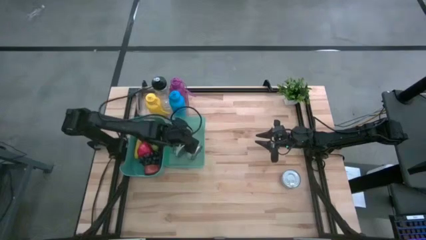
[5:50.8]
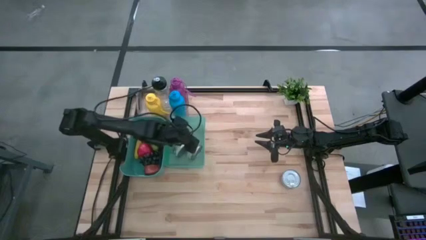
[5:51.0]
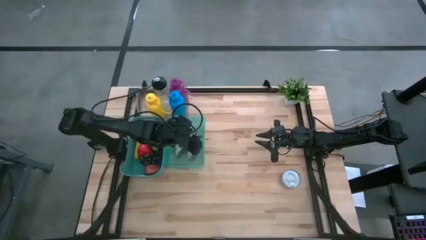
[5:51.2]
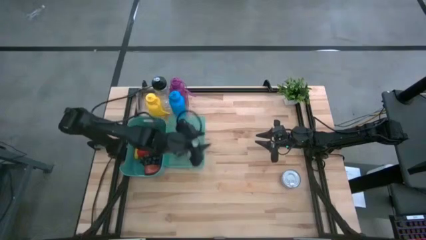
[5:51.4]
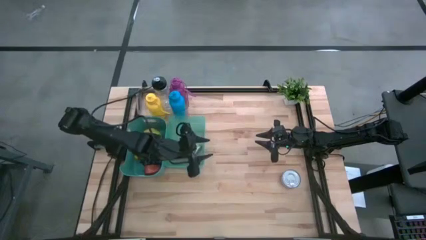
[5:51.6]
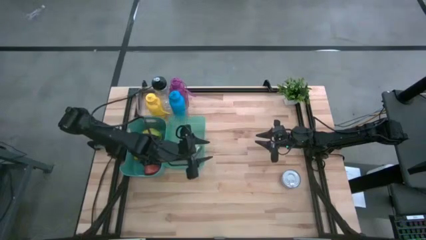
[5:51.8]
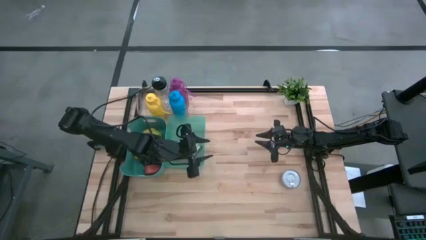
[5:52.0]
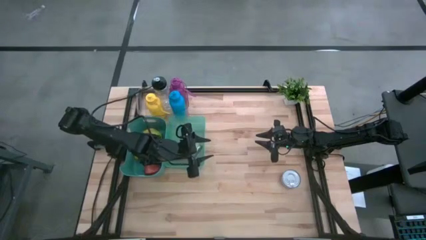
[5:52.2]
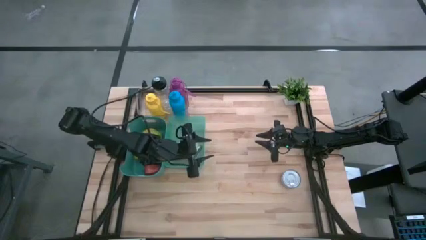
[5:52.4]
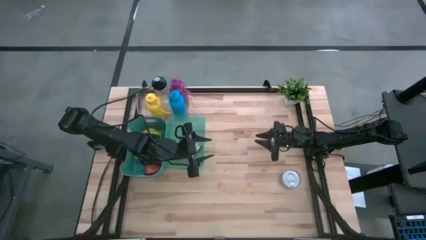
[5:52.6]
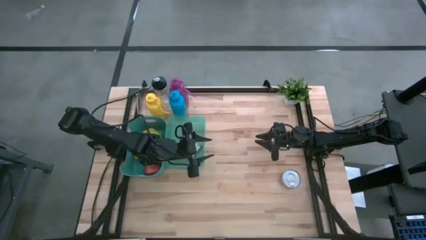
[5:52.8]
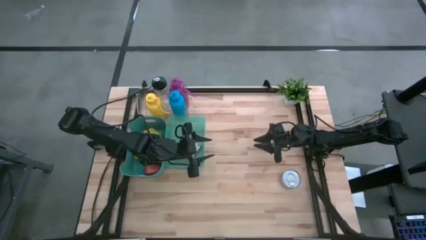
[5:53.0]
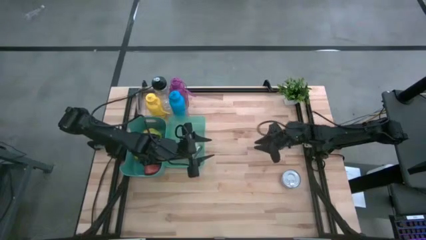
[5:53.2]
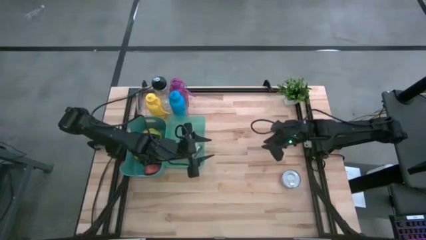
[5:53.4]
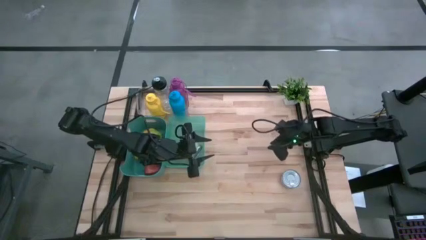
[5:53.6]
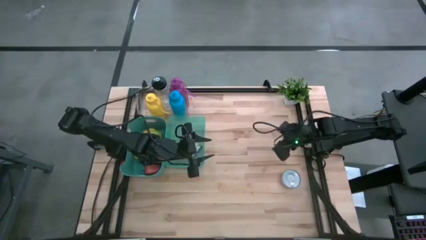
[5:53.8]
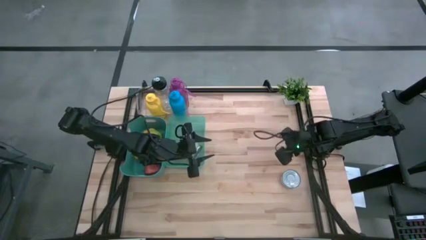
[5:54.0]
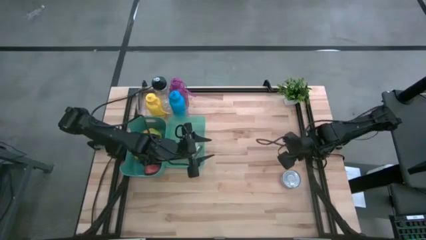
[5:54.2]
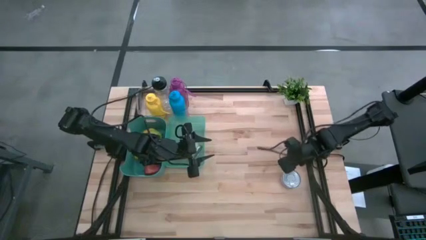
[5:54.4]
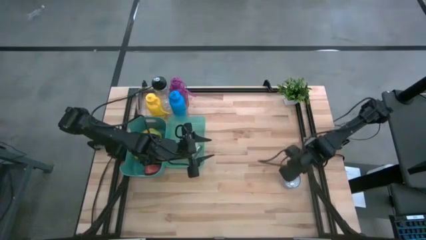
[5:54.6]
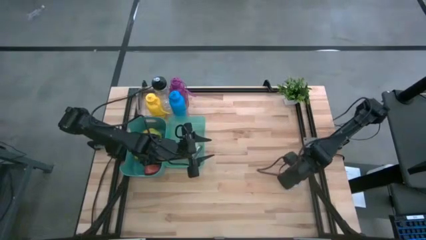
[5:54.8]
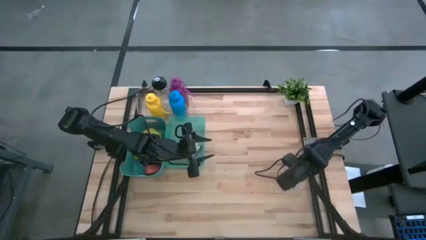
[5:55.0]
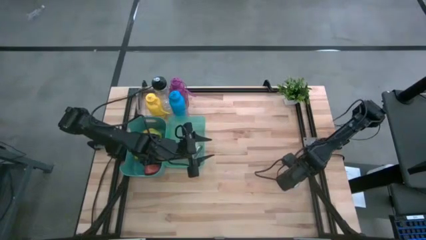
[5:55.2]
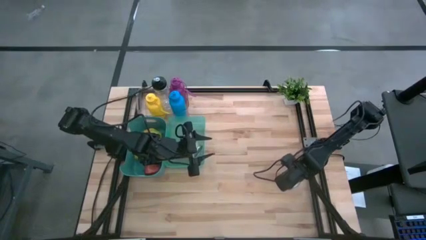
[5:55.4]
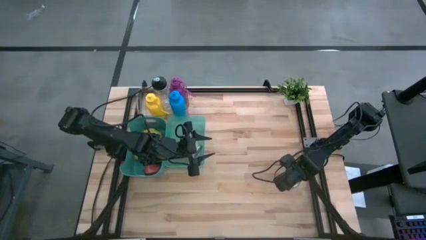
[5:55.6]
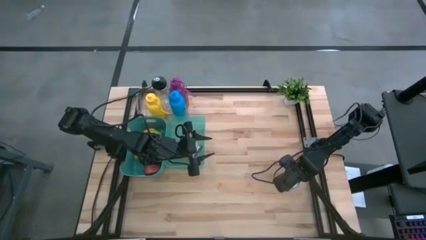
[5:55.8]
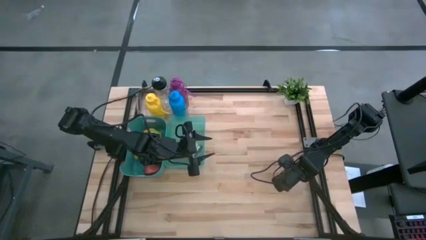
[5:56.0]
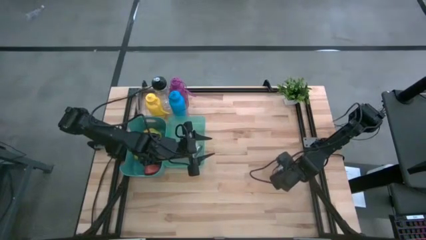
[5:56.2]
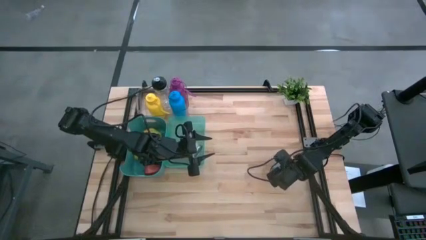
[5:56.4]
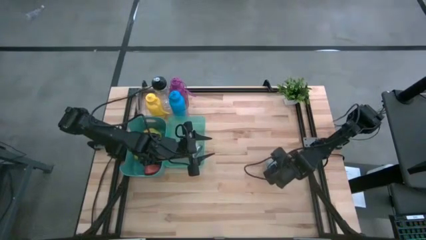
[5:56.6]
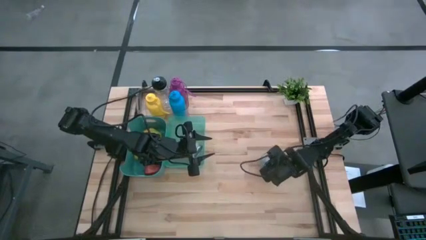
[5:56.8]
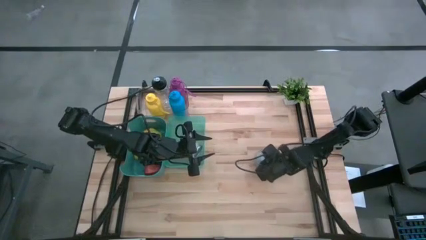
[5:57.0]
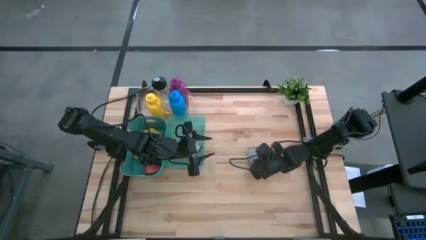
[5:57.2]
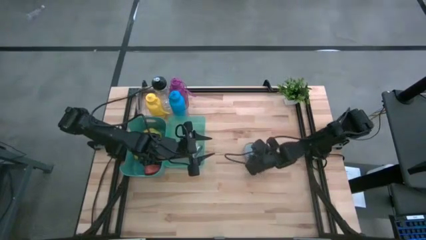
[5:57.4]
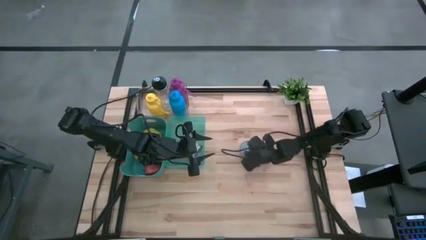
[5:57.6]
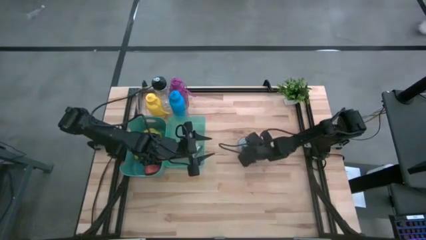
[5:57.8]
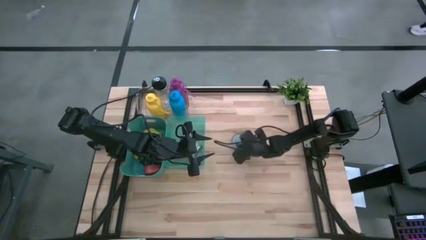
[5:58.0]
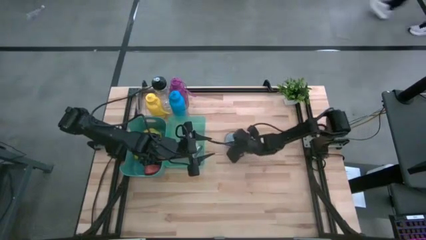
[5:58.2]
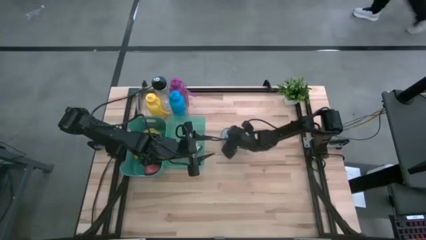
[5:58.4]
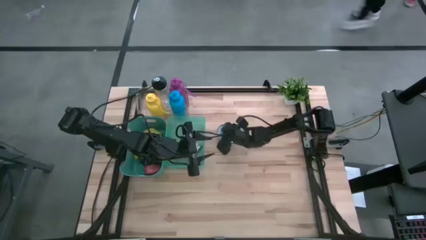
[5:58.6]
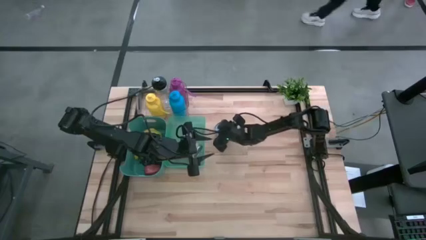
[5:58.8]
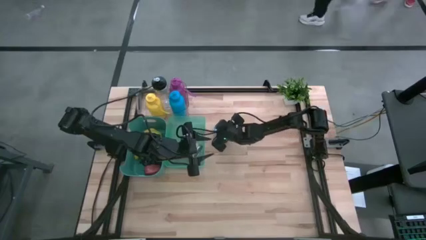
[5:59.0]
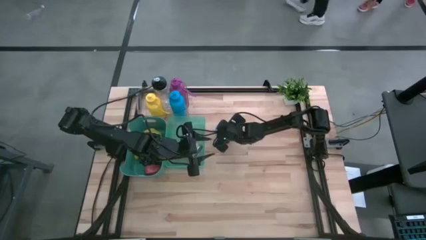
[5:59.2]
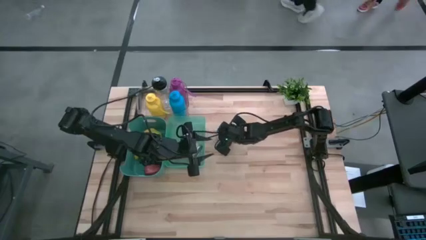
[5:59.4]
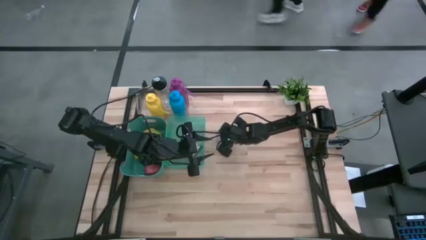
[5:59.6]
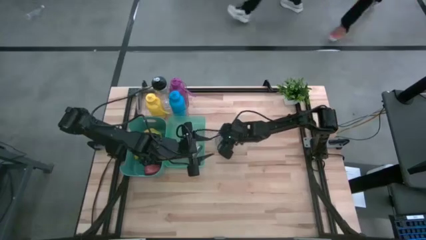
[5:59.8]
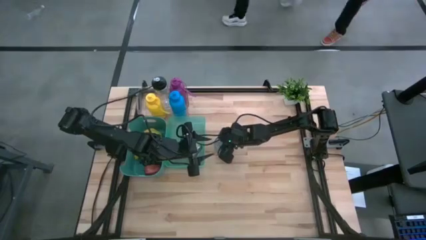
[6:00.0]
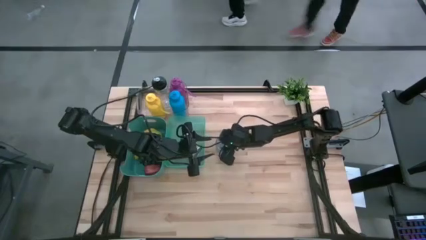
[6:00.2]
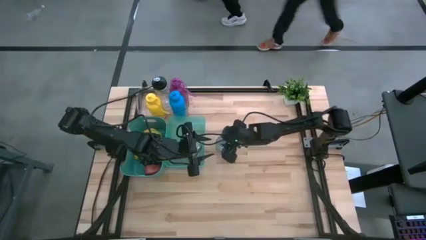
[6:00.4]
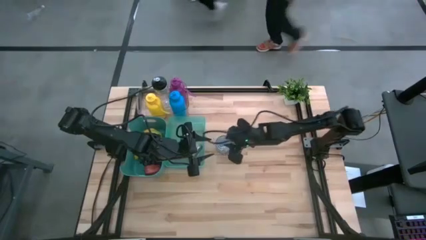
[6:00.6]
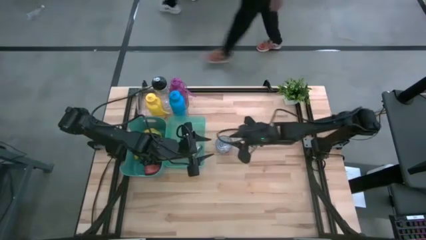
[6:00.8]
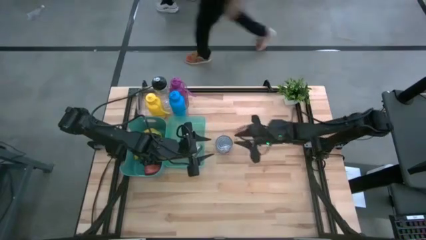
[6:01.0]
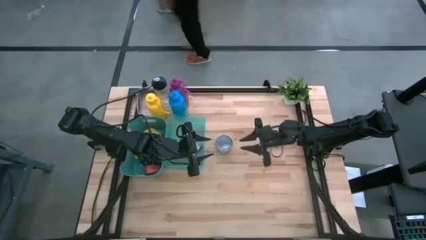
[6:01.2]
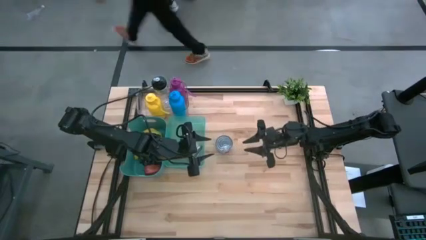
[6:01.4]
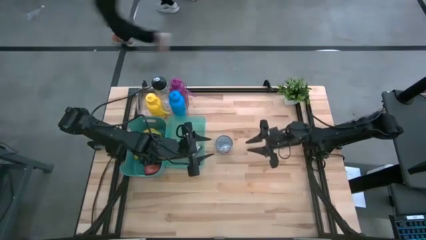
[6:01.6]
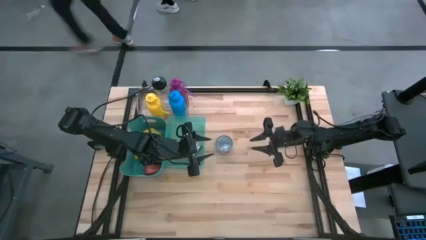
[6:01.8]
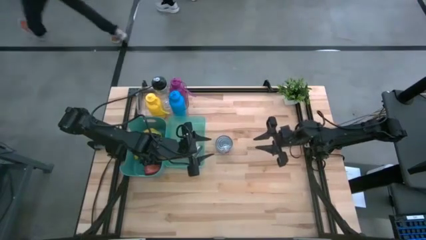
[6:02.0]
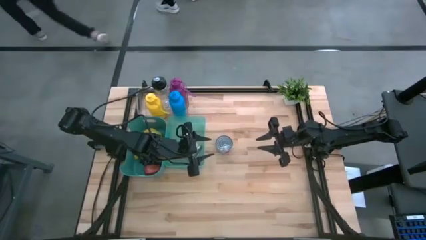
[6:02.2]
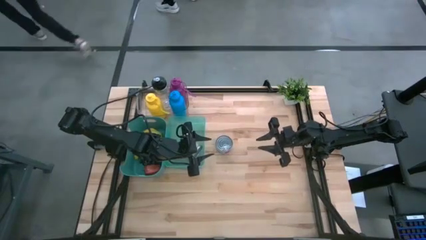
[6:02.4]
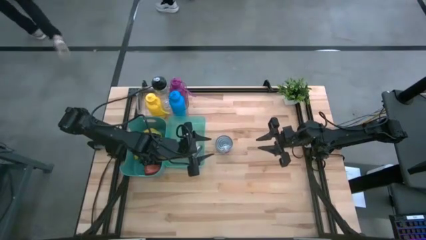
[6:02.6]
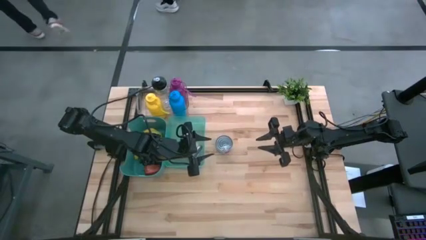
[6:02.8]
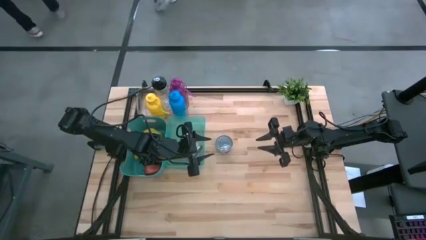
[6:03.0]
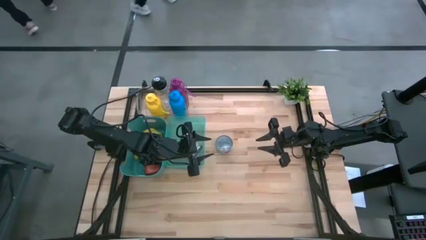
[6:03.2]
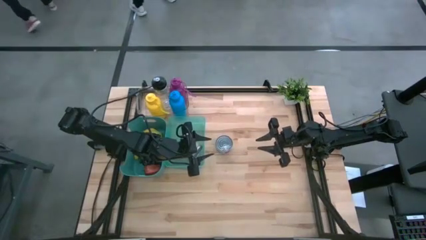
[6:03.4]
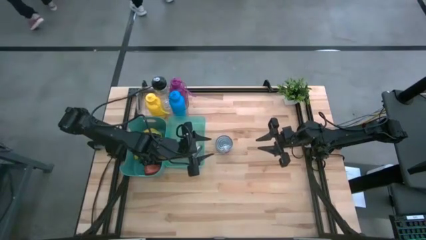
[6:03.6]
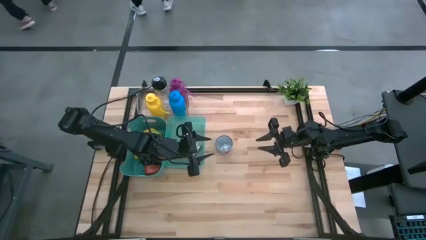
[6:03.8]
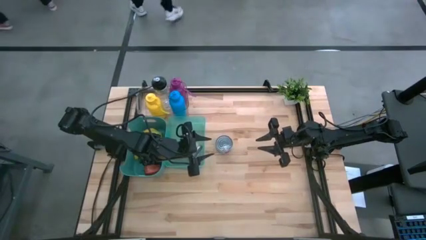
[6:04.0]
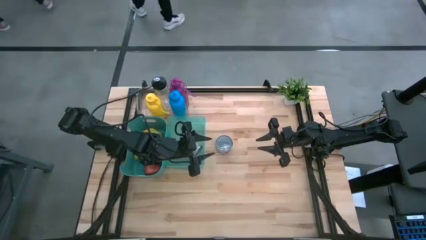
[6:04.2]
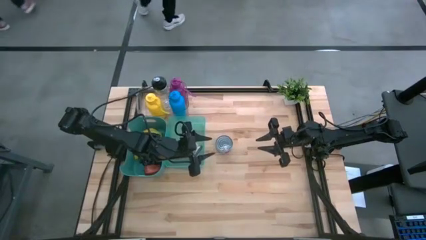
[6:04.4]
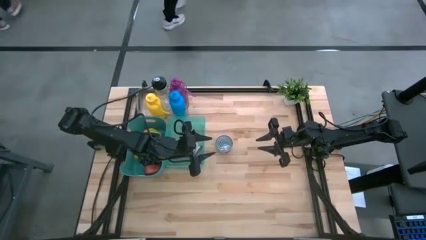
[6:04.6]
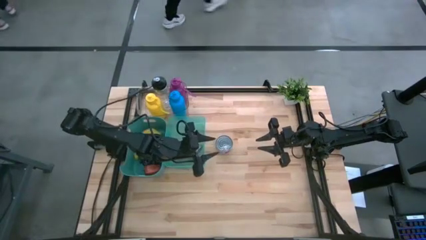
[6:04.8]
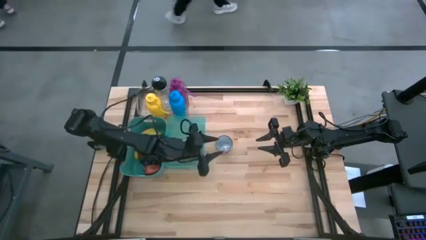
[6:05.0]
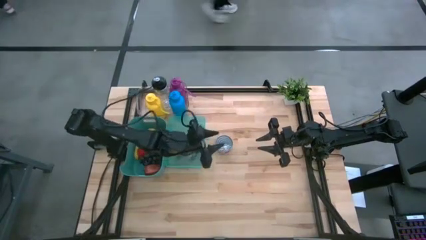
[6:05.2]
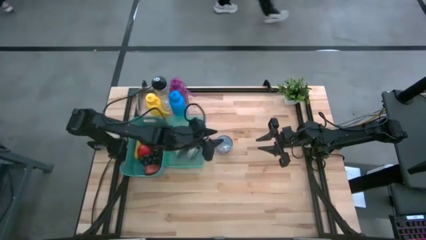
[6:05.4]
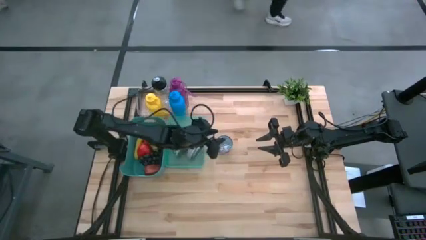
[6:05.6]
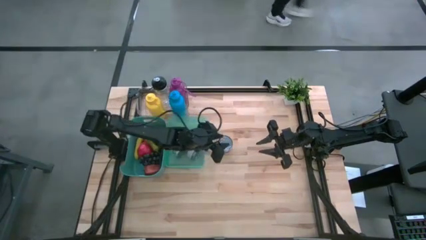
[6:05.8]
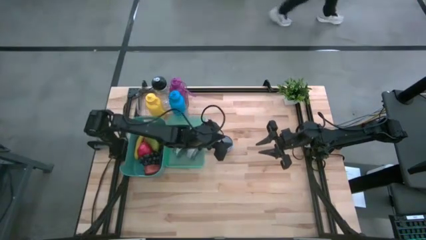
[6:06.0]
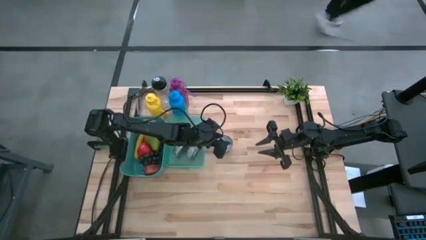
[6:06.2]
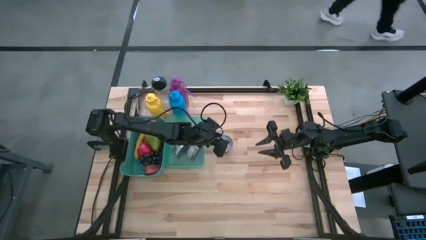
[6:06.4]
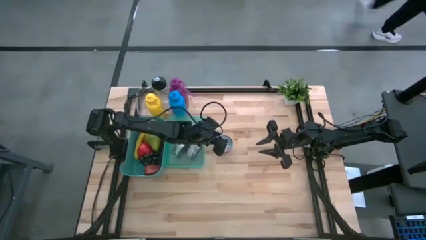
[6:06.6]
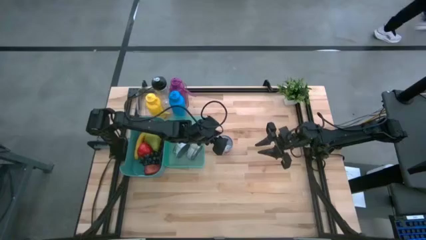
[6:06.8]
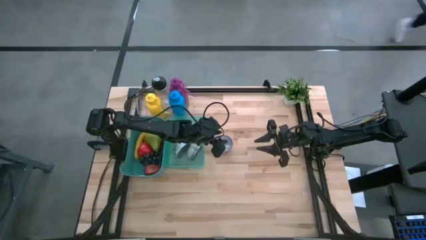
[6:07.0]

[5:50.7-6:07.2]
Task: Pick & Place Food Item
Put the red tuna can into the light green bin
